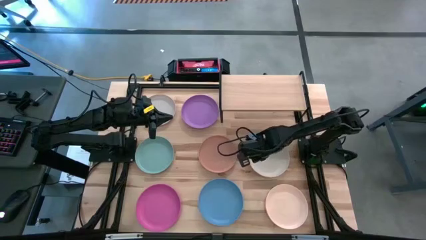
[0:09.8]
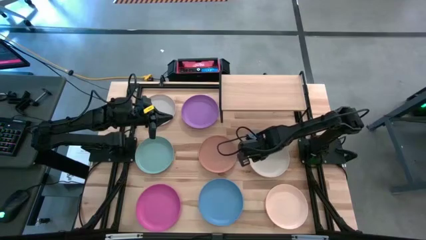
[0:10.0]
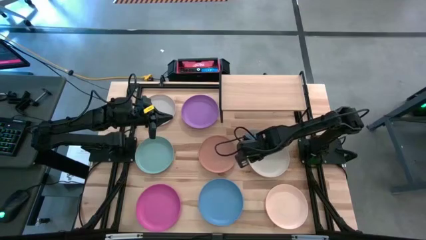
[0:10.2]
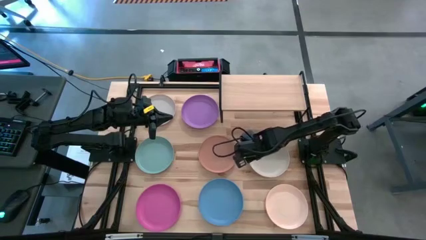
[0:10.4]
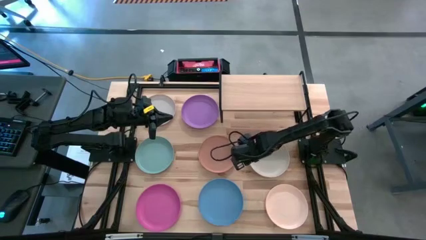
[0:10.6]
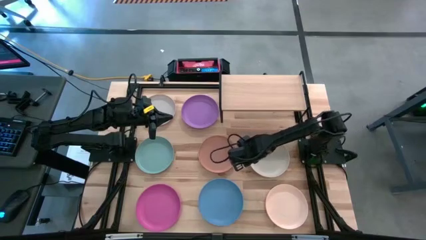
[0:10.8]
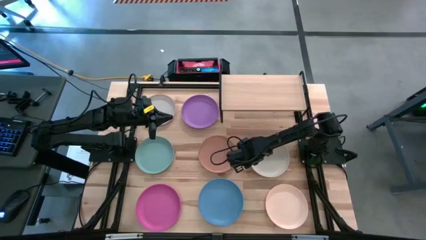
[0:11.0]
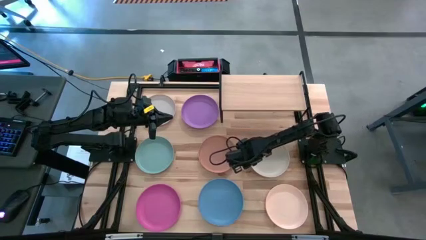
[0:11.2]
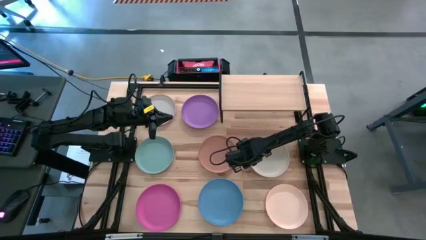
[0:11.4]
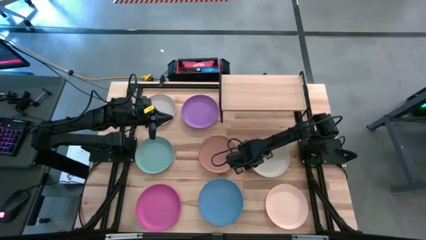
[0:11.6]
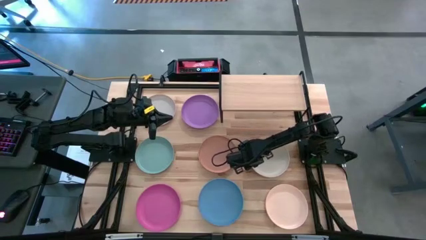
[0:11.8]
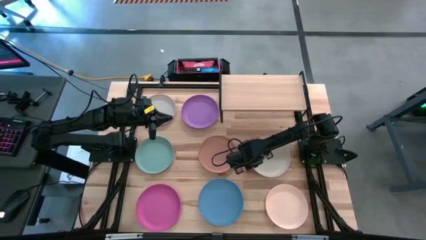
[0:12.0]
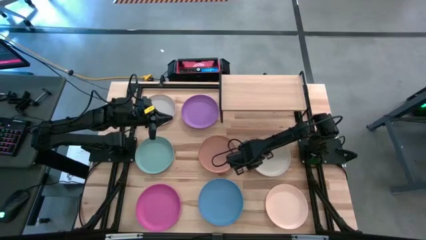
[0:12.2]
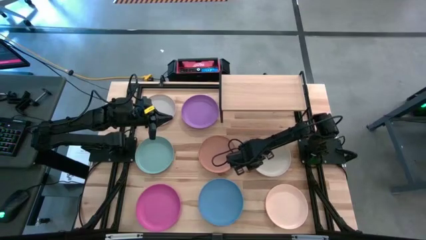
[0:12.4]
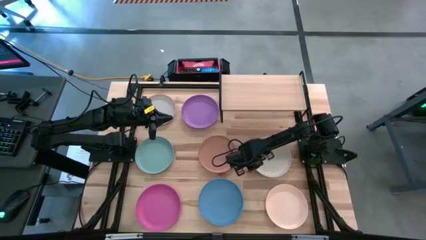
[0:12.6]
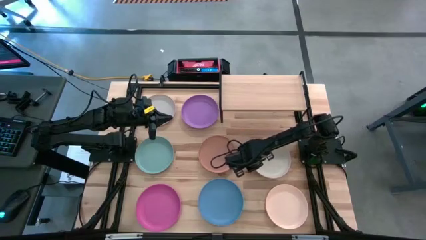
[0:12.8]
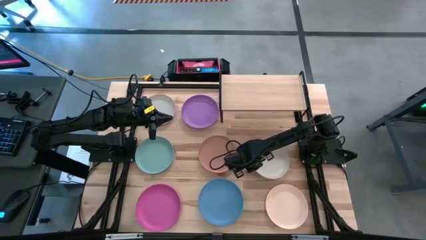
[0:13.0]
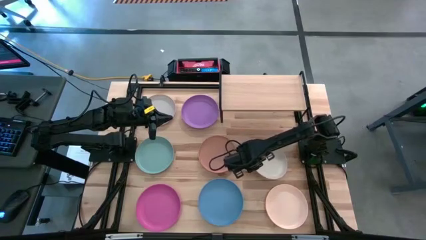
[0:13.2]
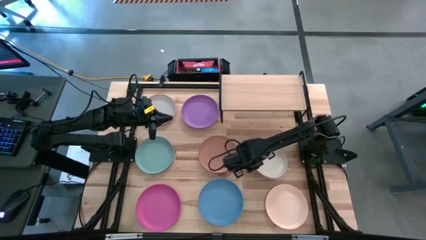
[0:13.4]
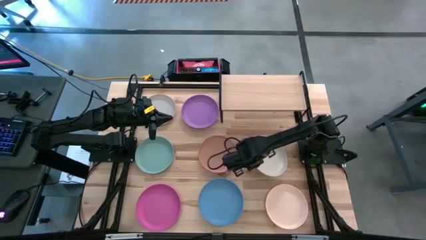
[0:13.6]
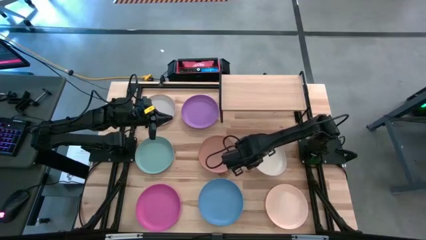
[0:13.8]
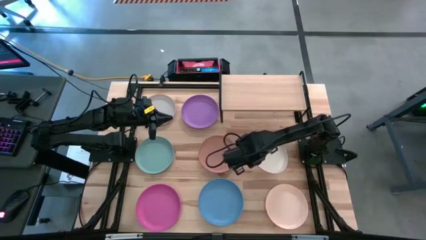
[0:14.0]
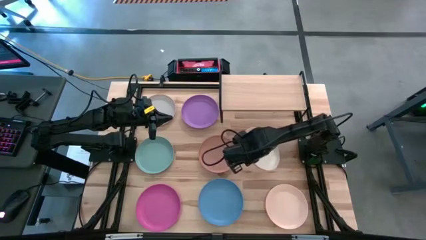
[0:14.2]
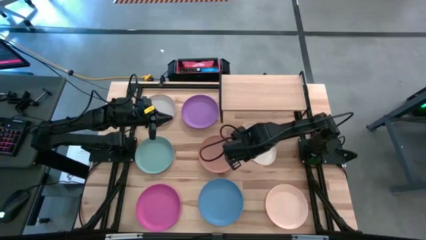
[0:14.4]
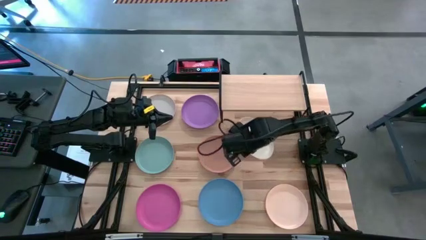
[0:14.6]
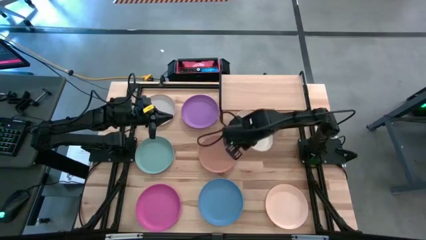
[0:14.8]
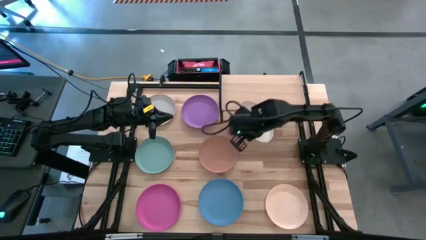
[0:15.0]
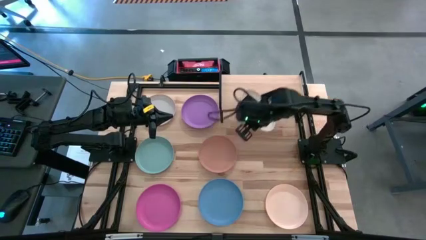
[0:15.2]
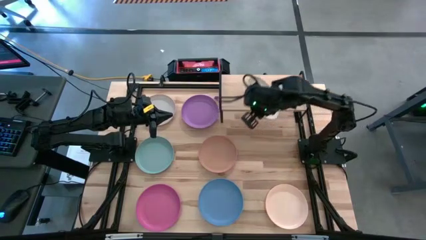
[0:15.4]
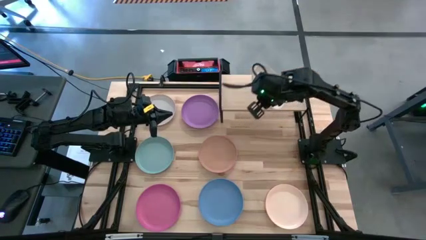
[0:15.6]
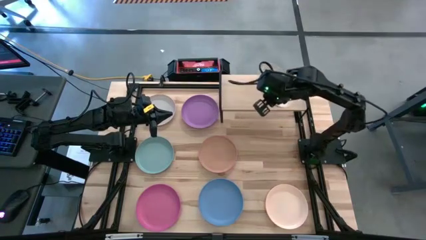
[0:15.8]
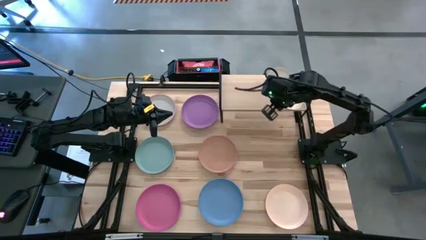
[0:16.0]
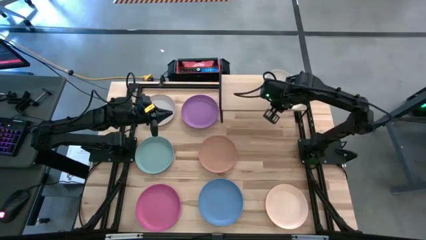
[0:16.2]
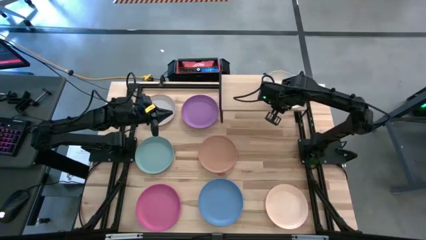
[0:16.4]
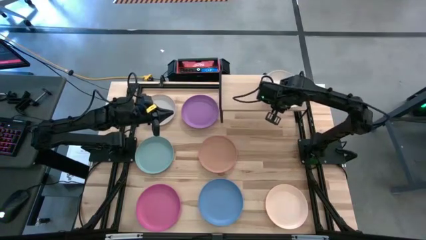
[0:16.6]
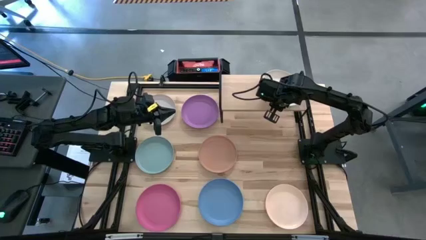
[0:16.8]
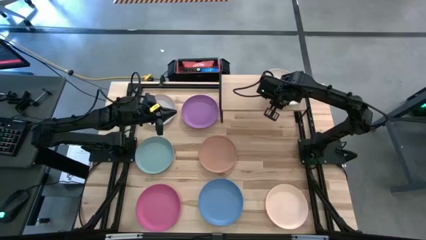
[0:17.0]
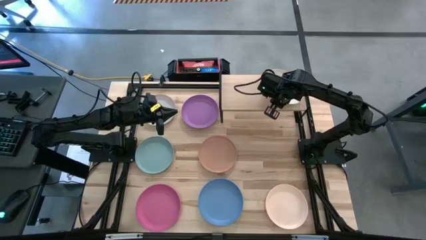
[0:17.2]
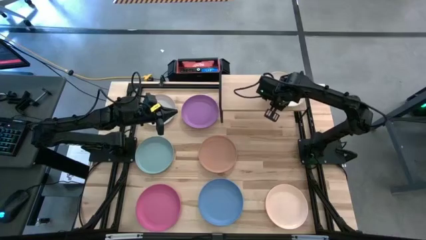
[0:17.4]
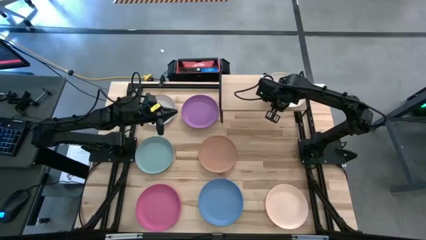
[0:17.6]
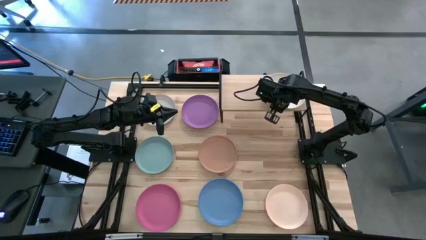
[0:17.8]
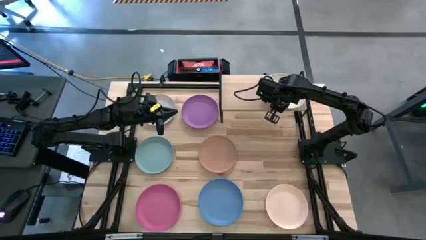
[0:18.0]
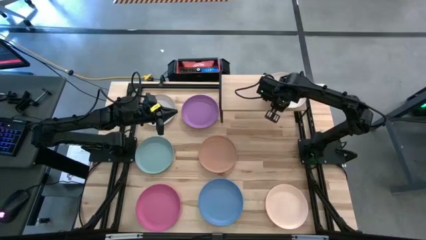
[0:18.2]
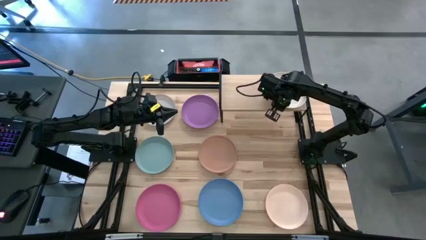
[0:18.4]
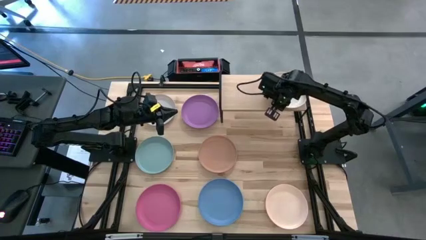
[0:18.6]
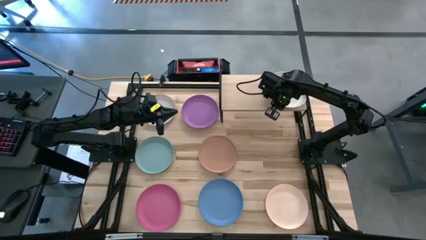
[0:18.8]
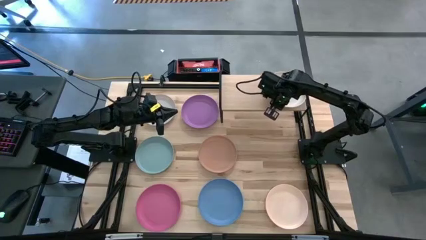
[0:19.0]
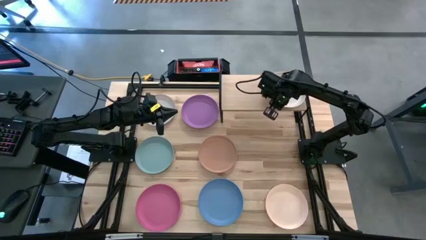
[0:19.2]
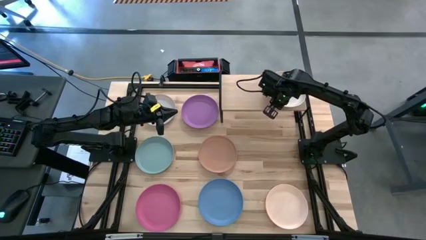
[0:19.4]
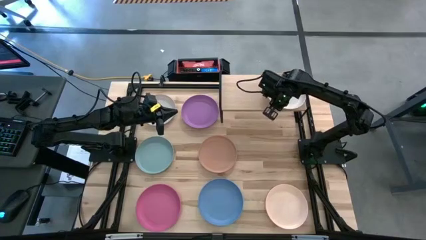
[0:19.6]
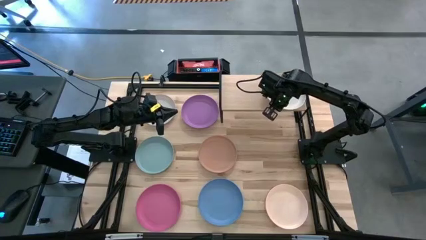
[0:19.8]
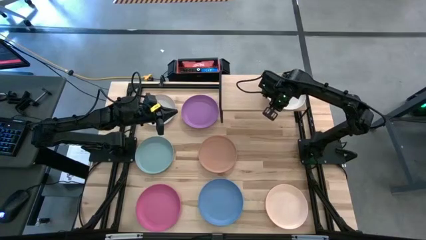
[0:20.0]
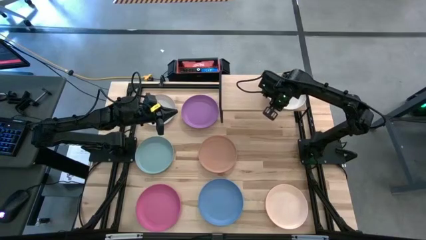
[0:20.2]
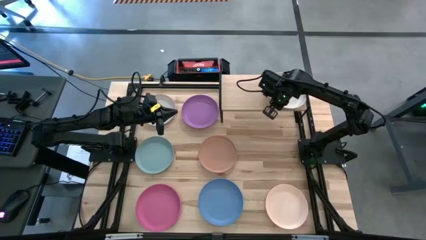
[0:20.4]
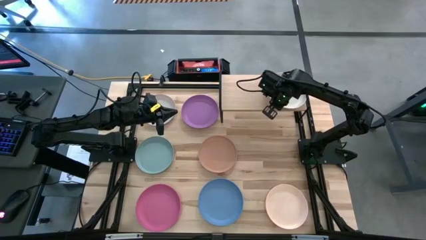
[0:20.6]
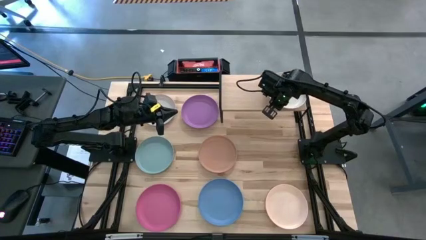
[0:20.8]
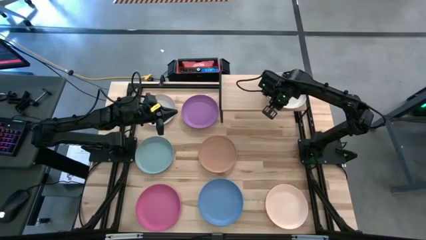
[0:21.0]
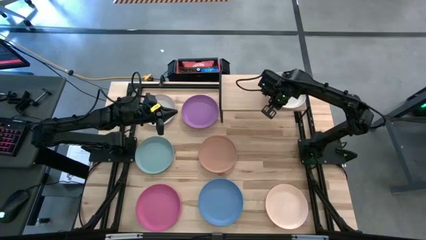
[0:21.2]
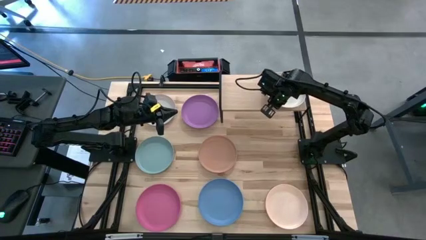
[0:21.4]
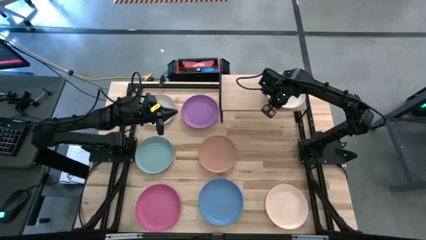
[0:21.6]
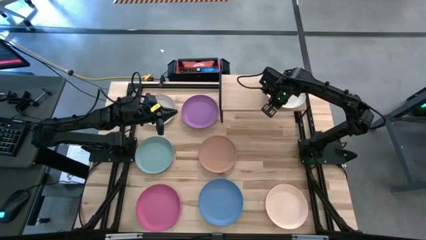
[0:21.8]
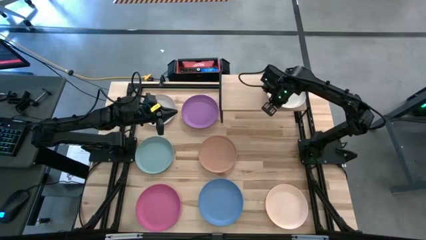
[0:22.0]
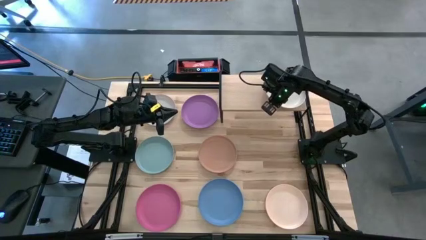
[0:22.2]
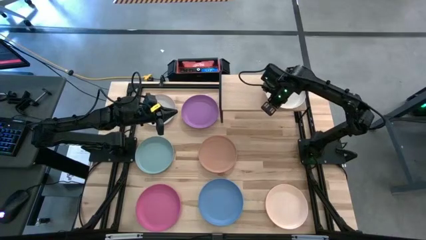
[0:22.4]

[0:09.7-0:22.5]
Task: Place and stack plates onto a shelf
Put the bottom white plate on the shelf
